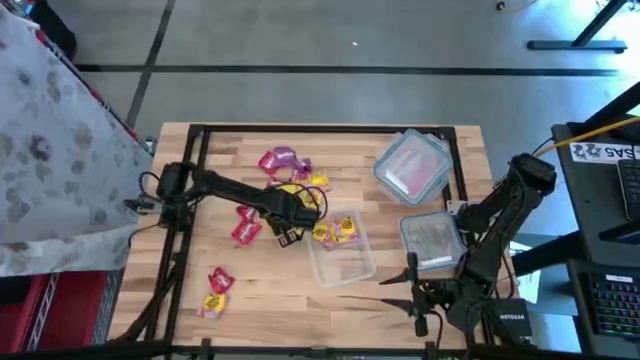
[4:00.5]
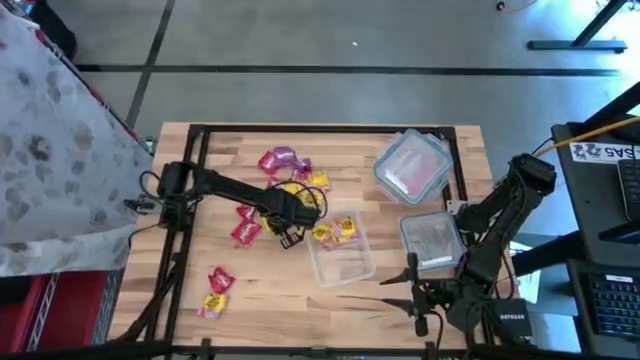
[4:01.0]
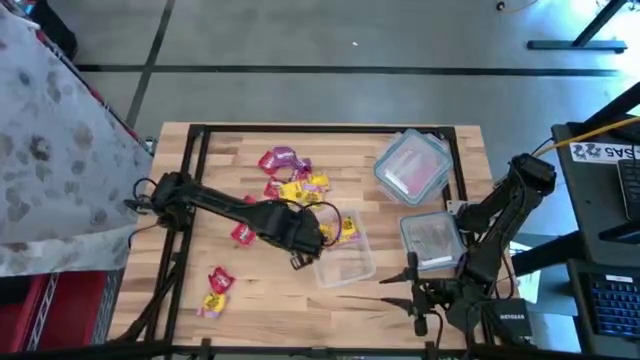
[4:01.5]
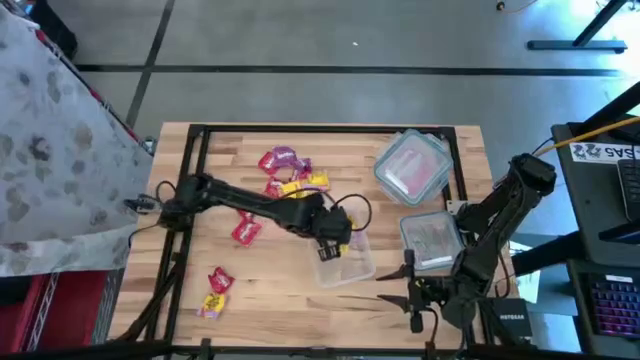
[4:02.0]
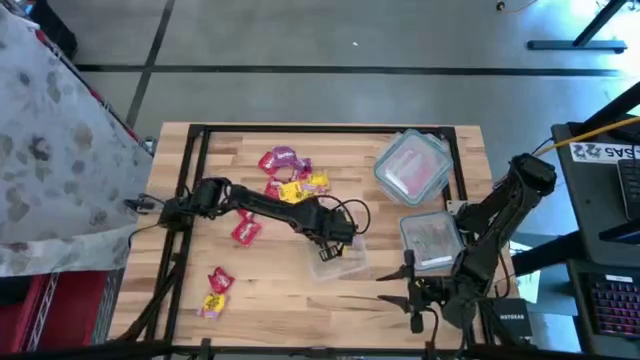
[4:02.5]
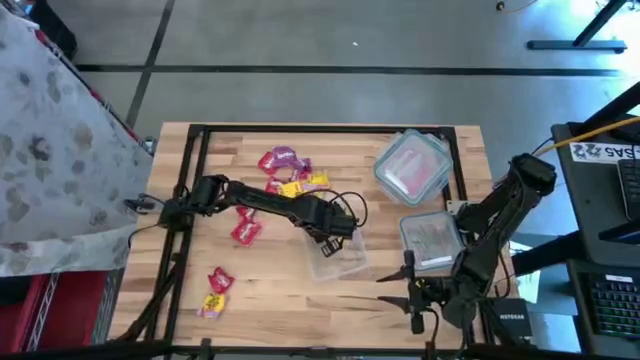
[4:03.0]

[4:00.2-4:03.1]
Task: Sort candy
Put the yellow candy into the rectangular transparent food container

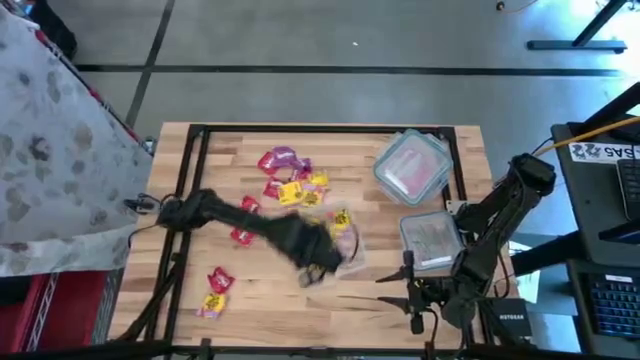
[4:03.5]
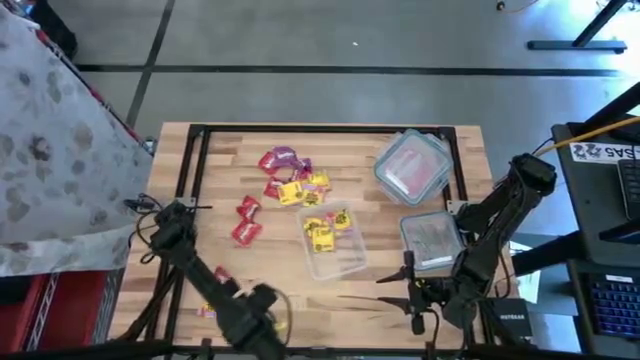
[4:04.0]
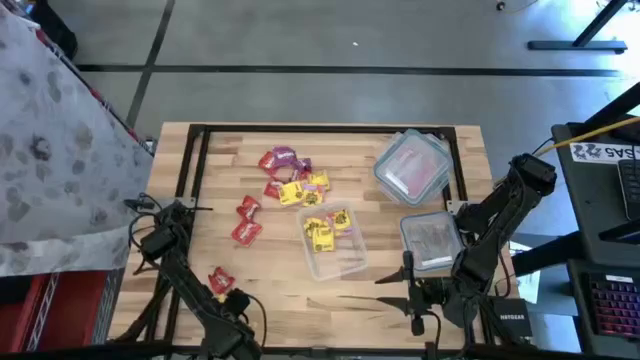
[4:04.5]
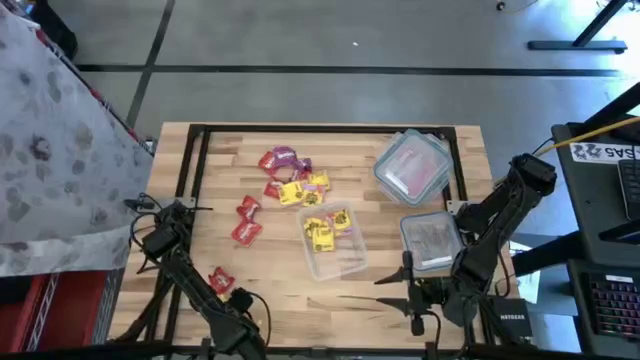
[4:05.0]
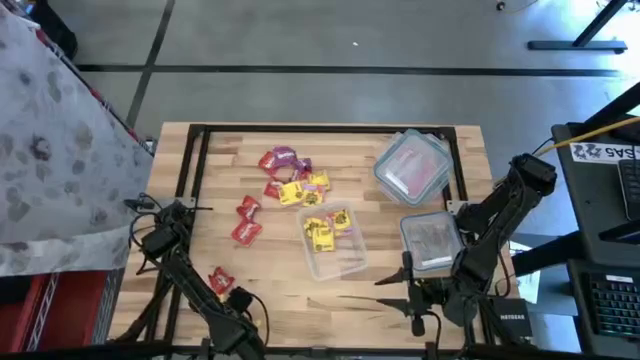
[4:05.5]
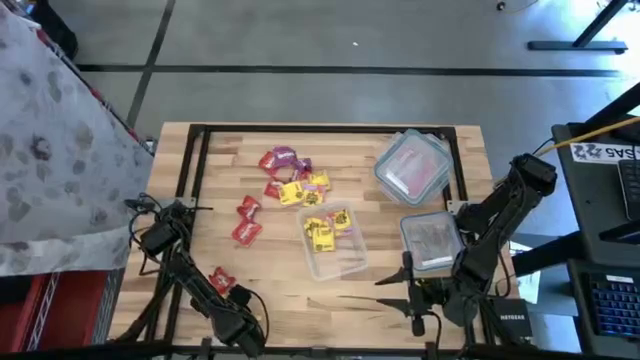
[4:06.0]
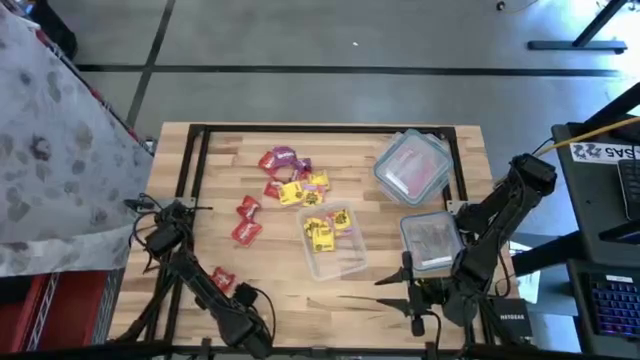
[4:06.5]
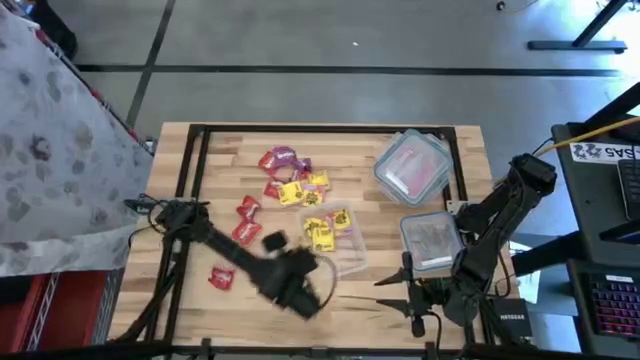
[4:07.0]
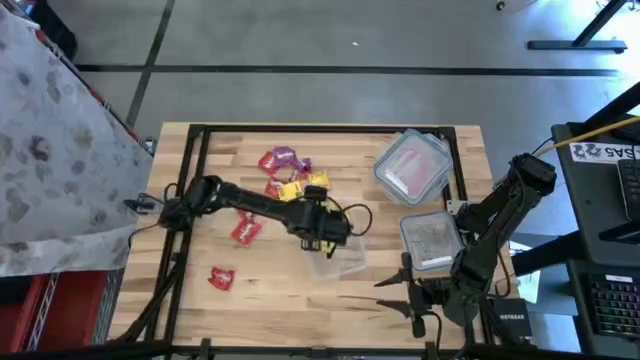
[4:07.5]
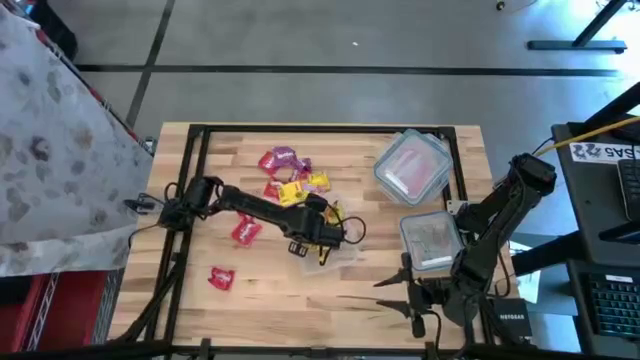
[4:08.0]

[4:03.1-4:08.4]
Put the yellow candy into the rectangular transparent food container

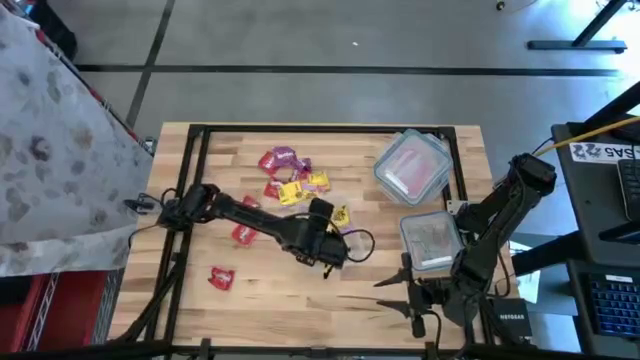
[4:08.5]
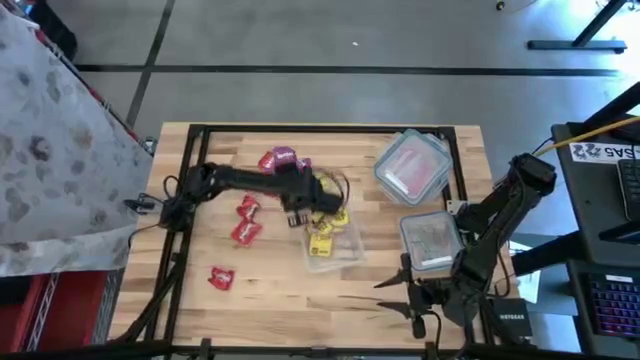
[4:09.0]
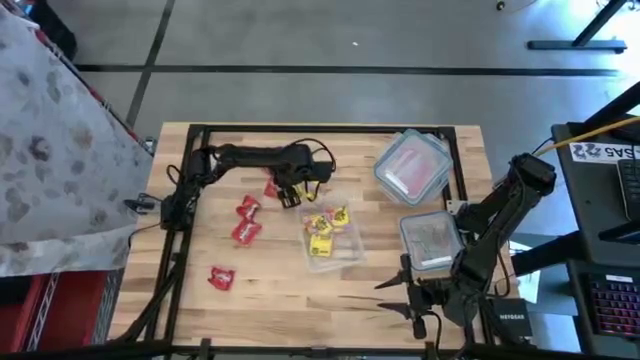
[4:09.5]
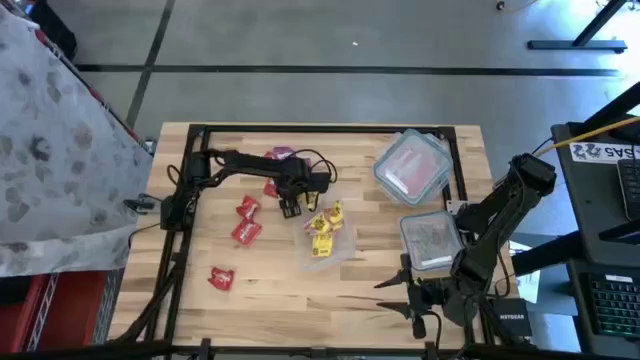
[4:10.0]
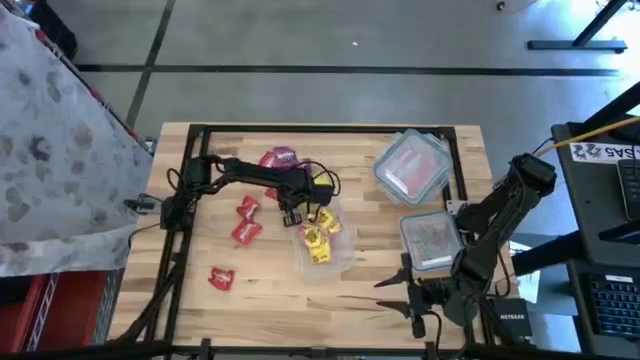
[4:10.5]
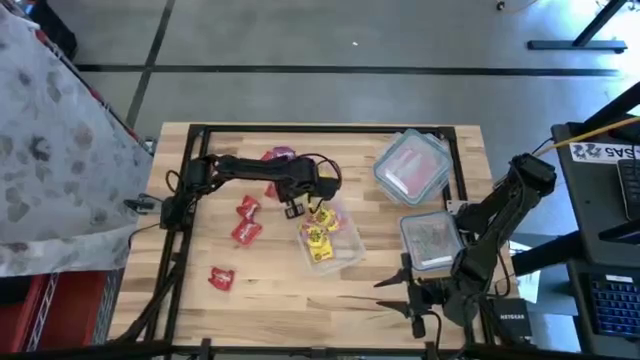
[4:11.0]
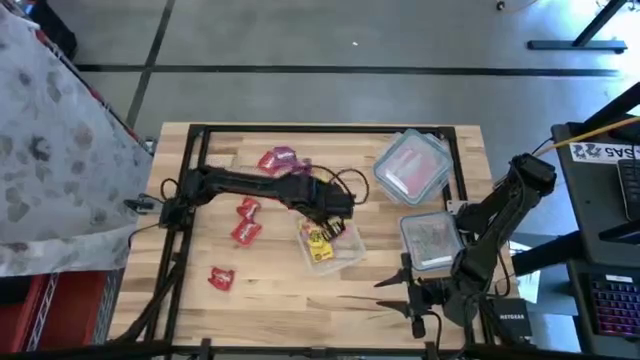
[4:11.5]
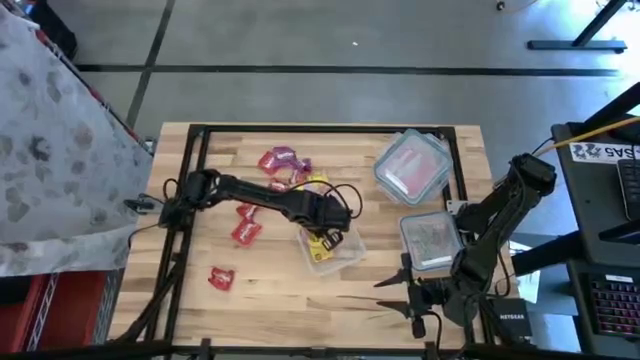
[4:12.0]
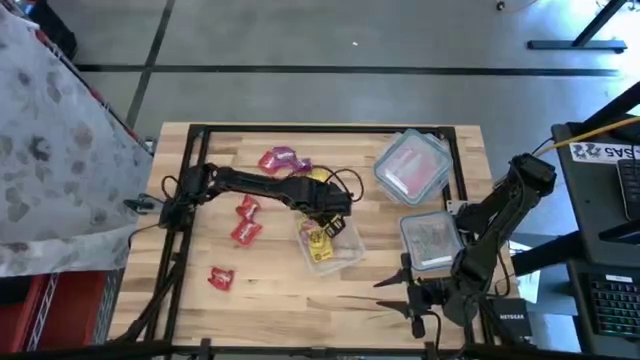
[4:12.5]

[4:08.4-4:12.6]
Put the yellow candy into the rectangular transparent food container

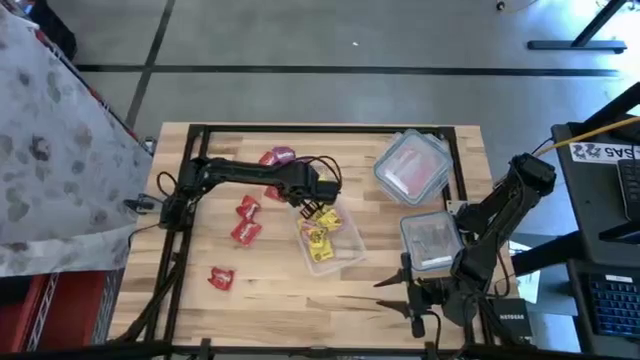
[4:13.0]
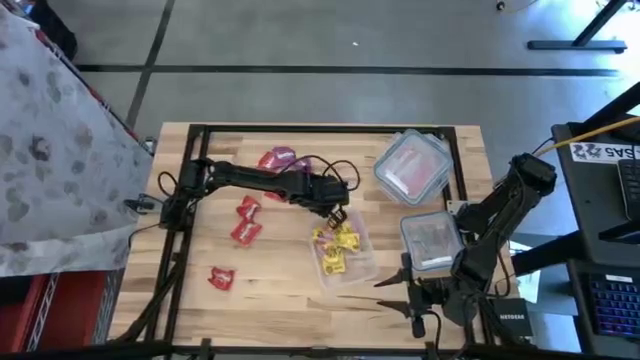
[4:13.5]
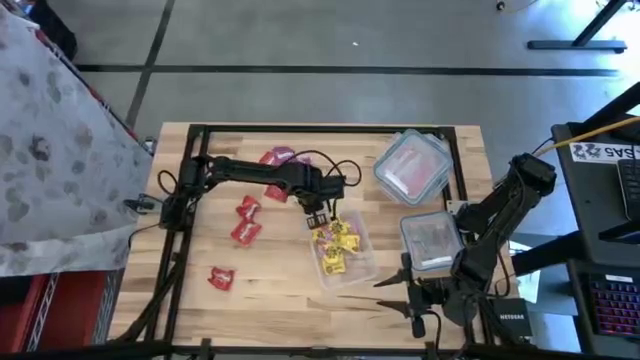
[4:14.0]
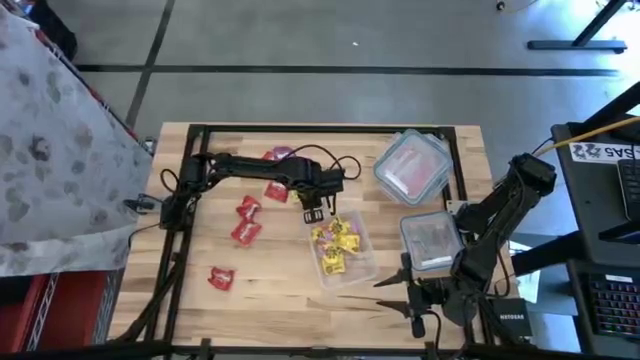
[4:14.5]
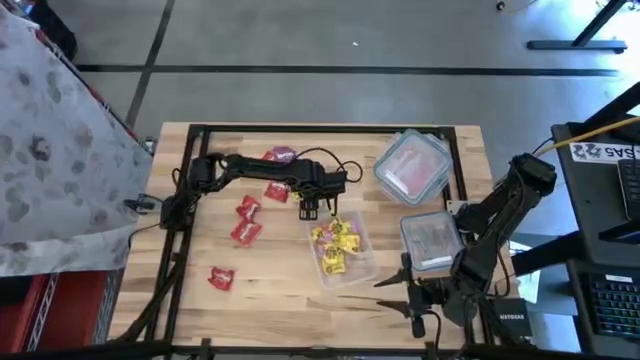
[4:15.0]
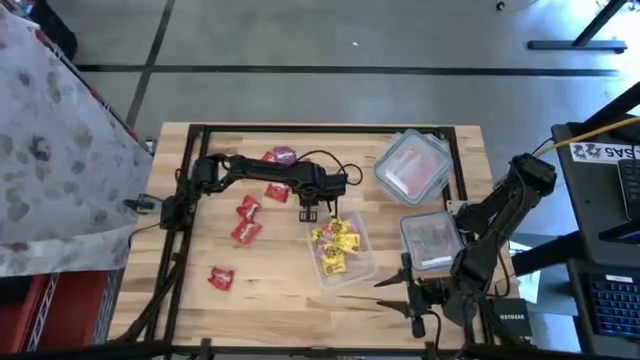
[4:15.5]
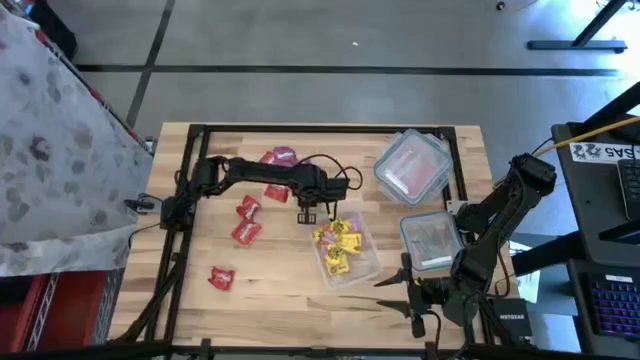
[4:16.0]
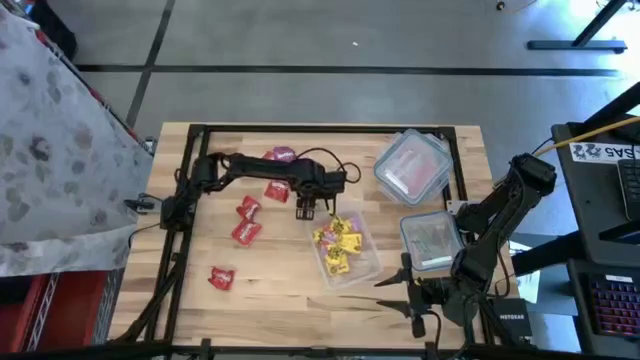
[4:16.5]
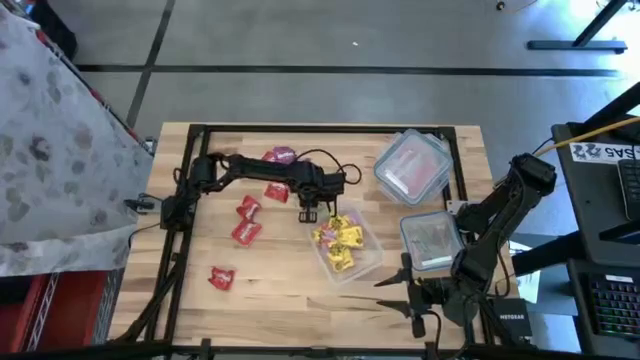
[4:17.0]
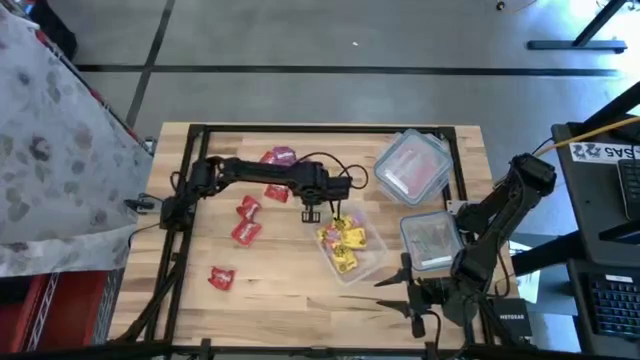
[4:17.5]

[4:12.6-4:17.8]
Put the yellow candy into the rectangular transparent food container

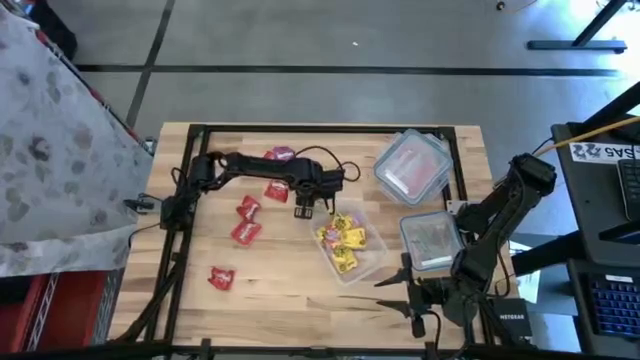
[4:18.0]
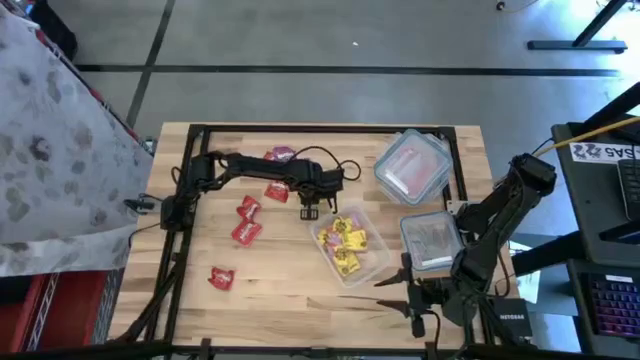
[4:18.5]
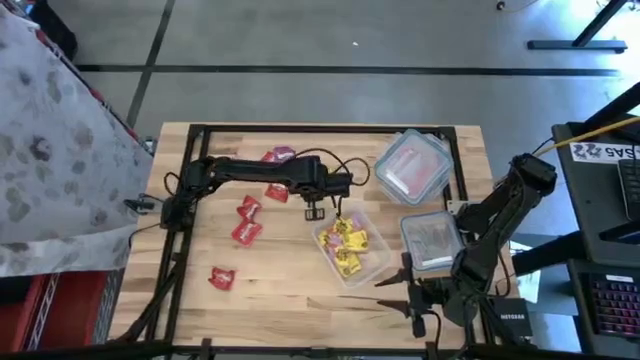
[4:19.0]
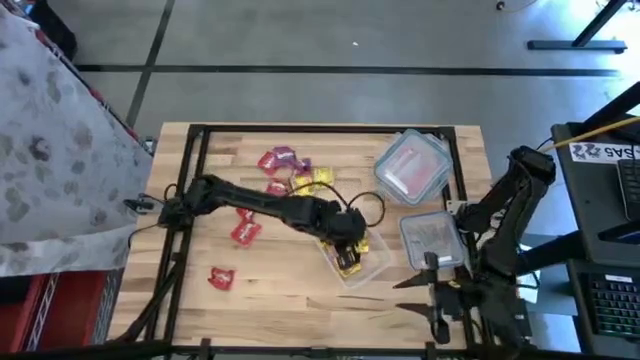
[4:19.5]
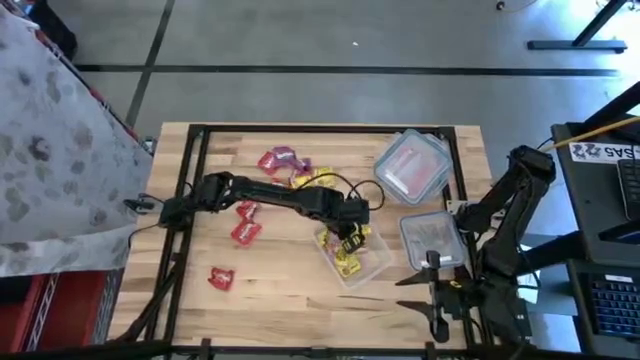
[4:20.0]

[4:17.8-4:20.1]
Put the yellow candy into the rectangular transparent food container

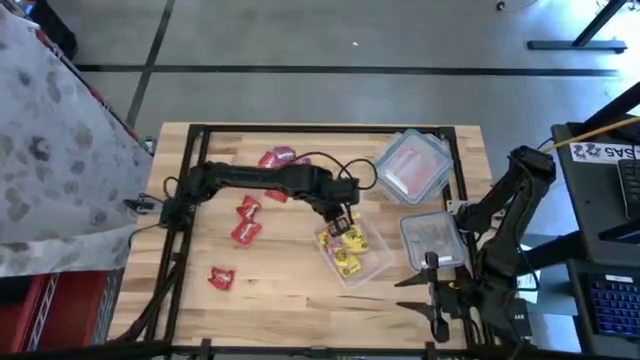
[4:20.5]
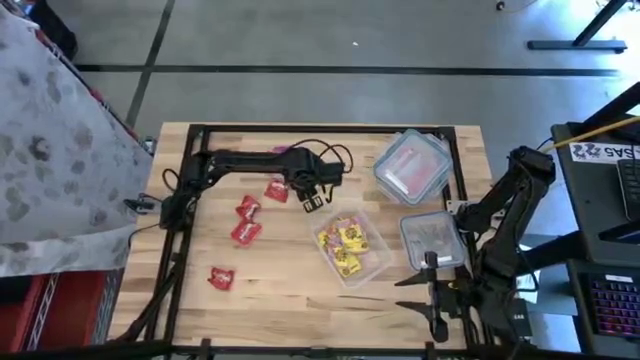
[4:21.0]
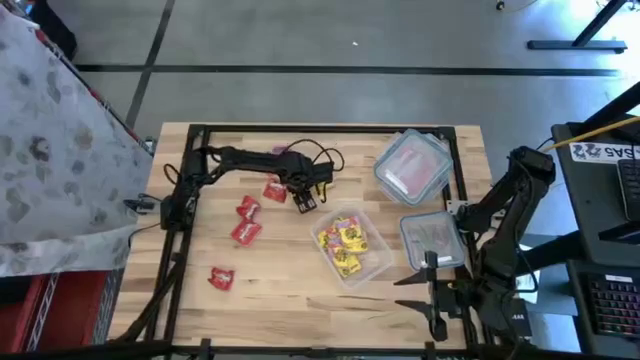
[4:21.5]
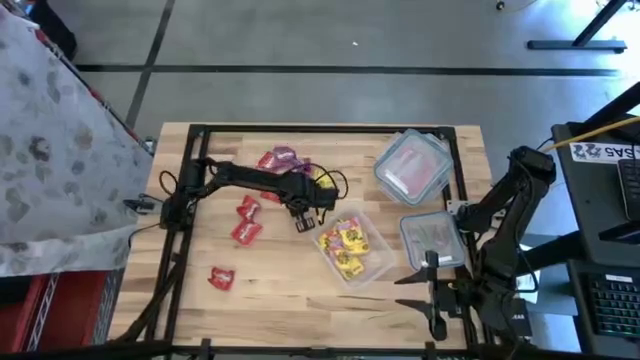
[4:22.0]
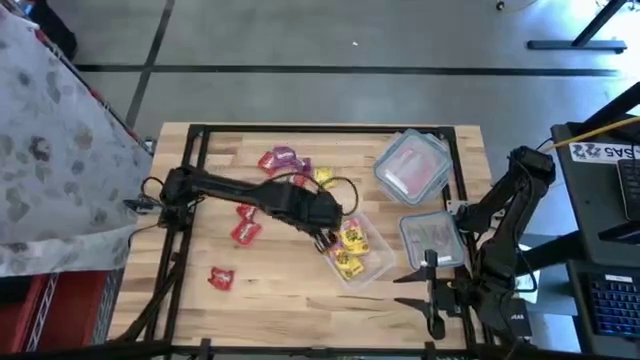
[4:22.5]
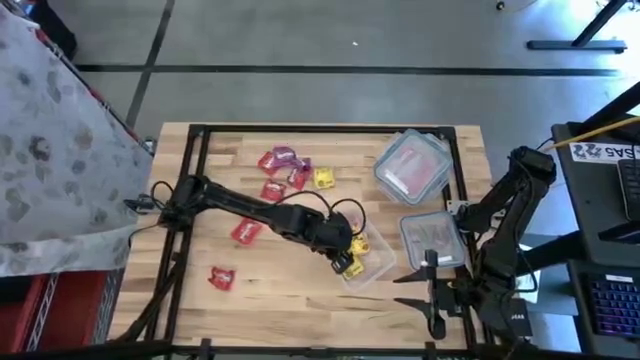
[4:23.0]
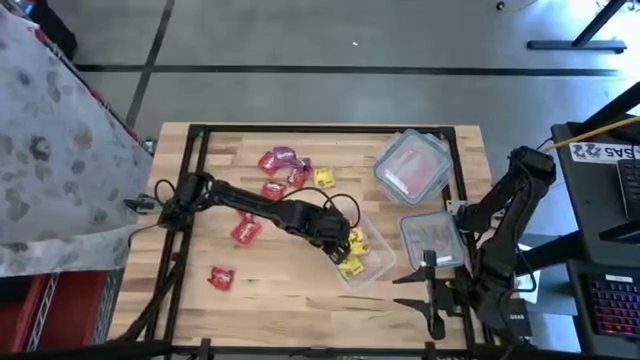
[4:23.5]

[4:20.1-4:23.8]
Put the yellow candy into the rectangular transparent food container
